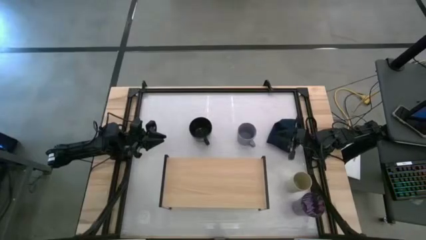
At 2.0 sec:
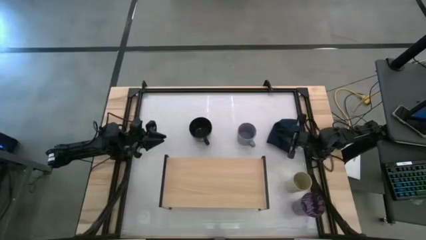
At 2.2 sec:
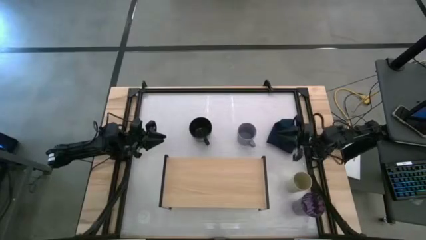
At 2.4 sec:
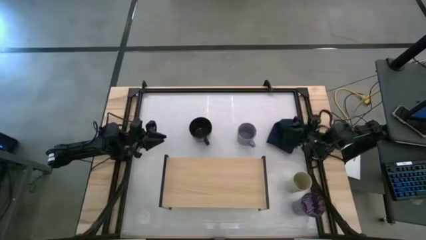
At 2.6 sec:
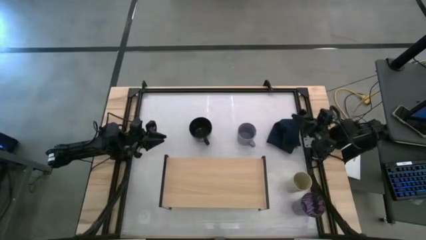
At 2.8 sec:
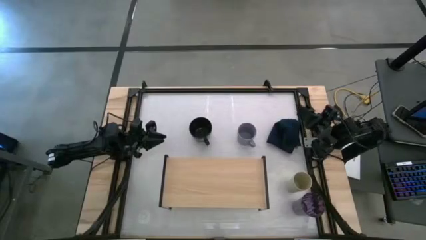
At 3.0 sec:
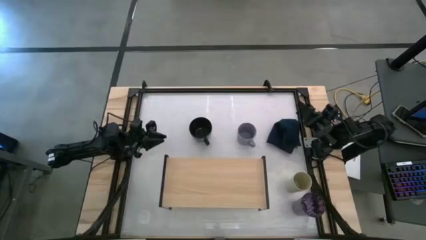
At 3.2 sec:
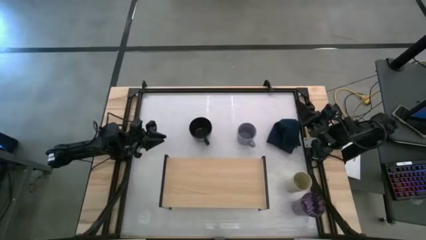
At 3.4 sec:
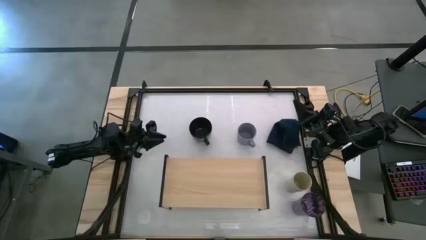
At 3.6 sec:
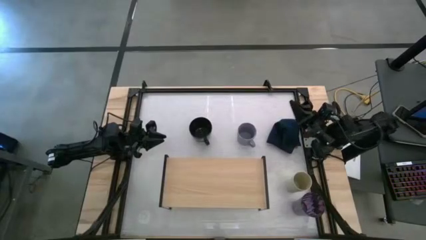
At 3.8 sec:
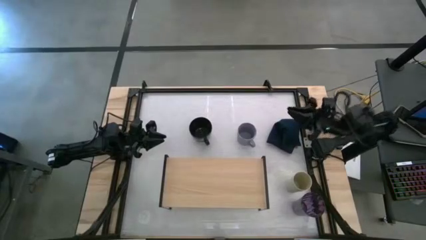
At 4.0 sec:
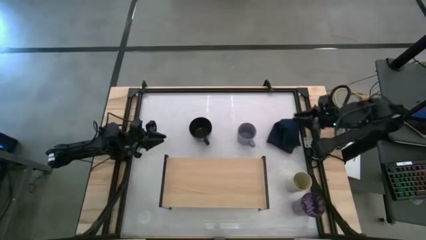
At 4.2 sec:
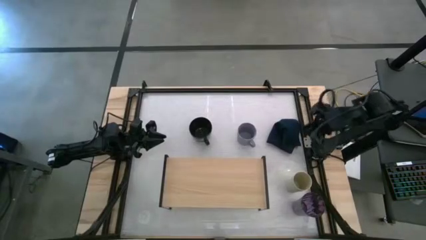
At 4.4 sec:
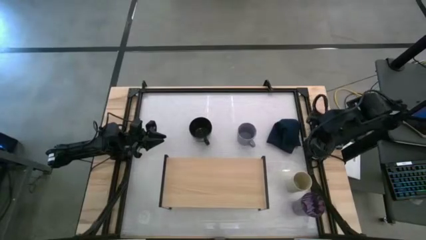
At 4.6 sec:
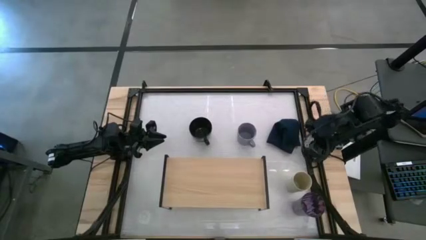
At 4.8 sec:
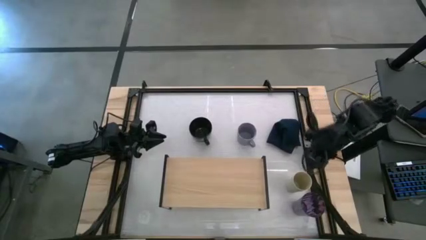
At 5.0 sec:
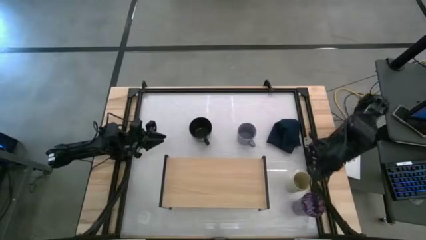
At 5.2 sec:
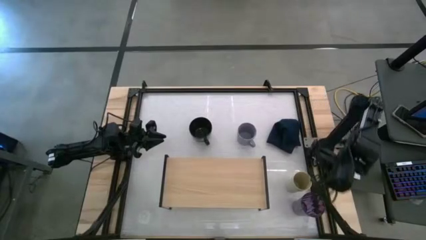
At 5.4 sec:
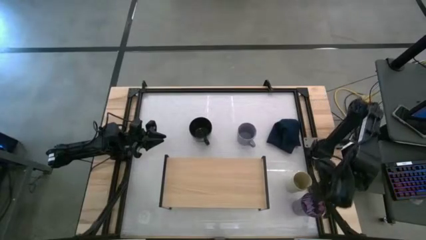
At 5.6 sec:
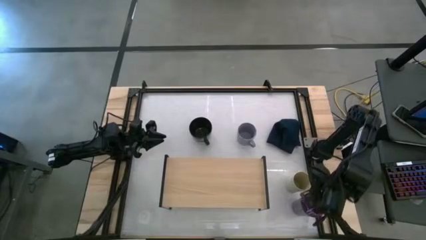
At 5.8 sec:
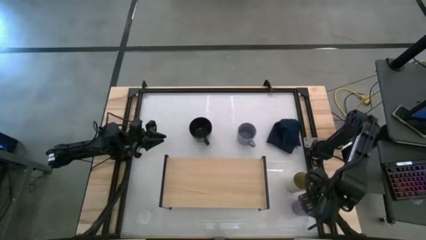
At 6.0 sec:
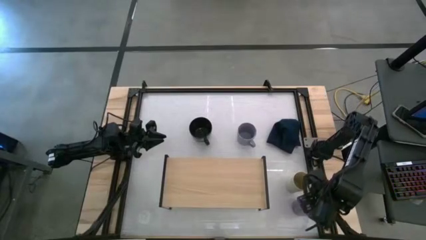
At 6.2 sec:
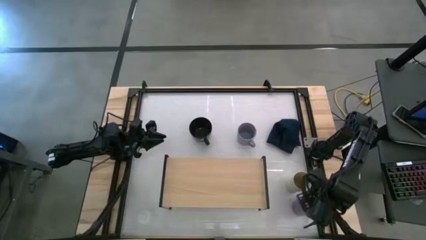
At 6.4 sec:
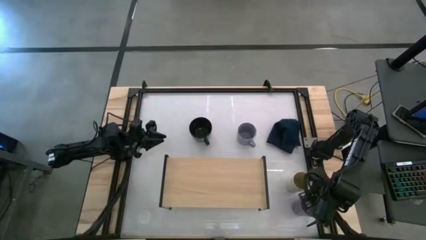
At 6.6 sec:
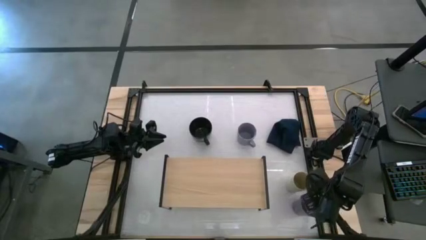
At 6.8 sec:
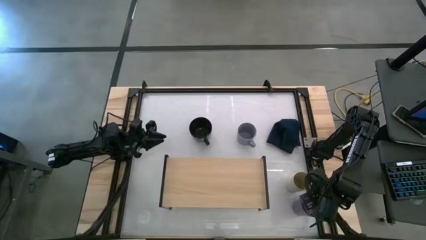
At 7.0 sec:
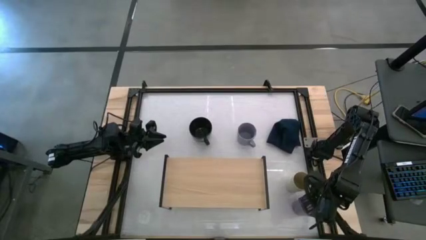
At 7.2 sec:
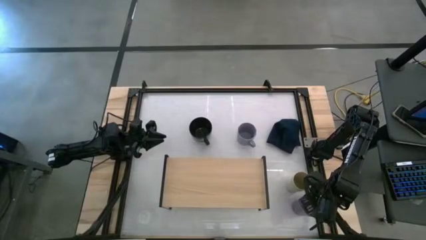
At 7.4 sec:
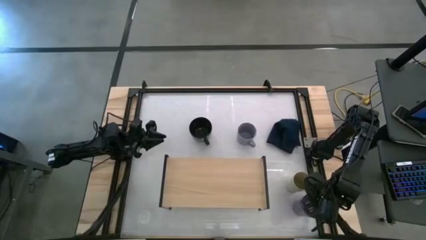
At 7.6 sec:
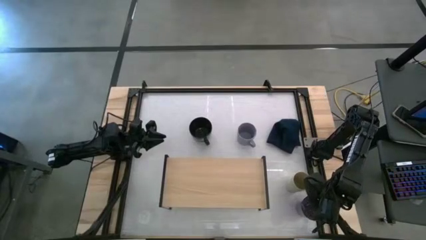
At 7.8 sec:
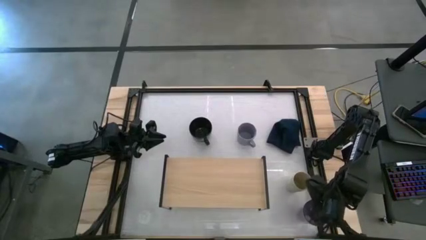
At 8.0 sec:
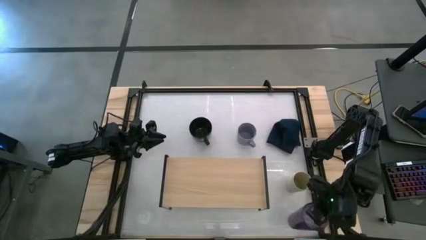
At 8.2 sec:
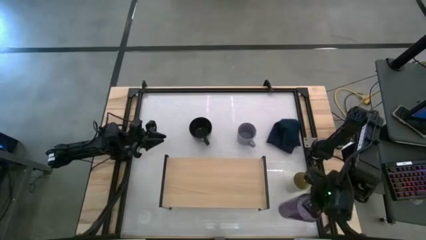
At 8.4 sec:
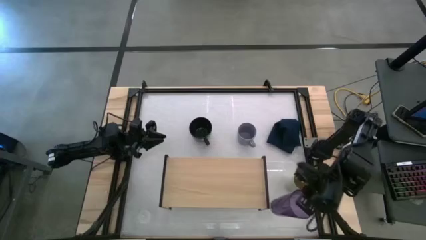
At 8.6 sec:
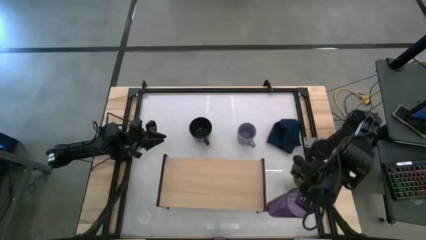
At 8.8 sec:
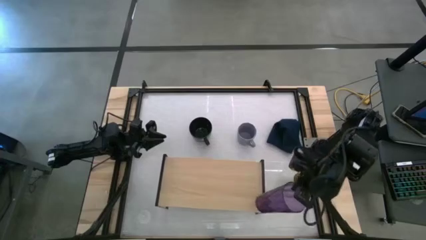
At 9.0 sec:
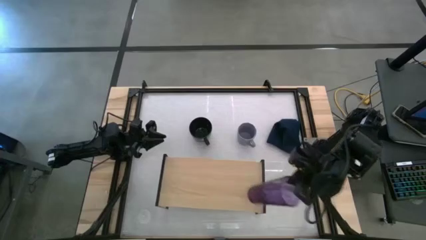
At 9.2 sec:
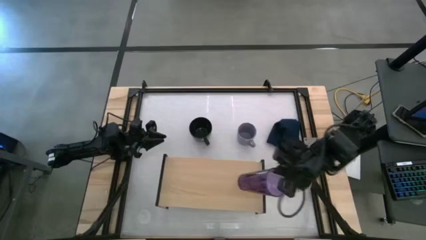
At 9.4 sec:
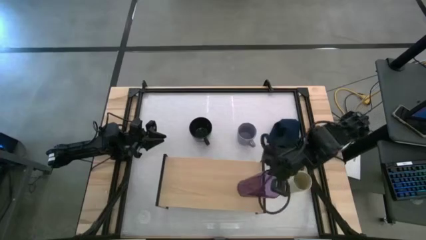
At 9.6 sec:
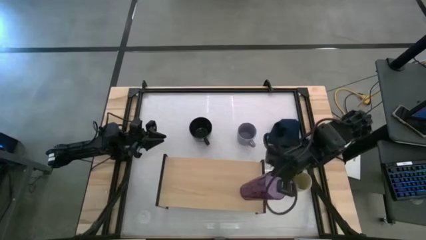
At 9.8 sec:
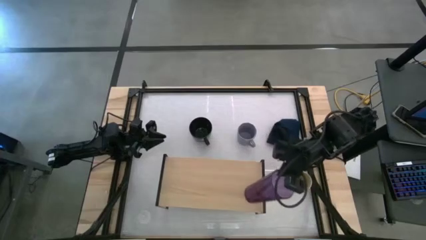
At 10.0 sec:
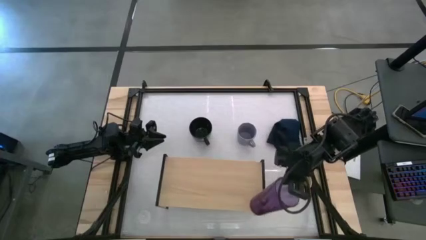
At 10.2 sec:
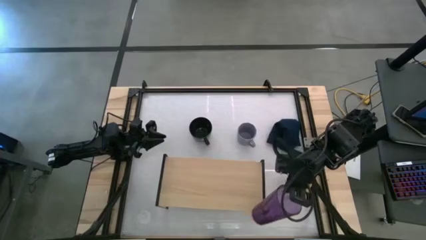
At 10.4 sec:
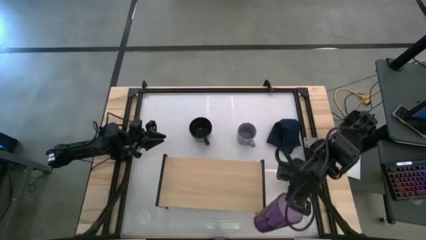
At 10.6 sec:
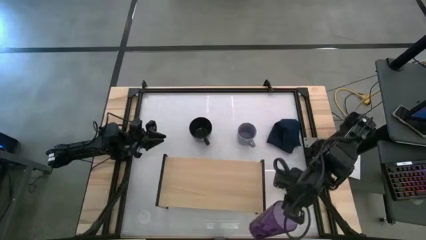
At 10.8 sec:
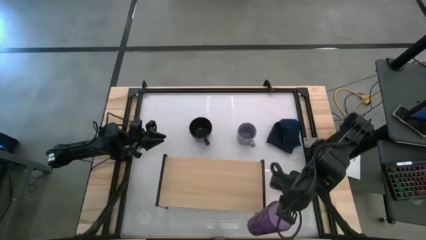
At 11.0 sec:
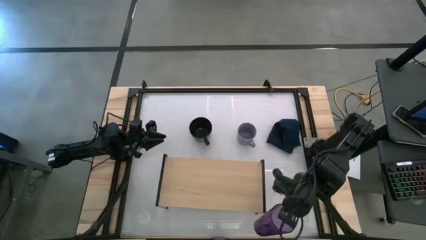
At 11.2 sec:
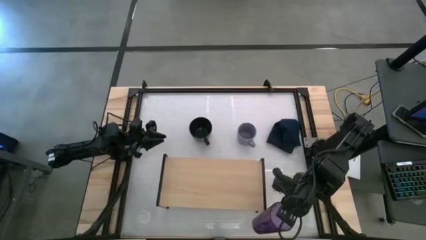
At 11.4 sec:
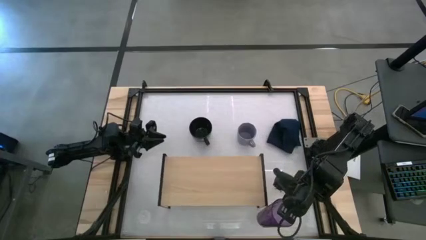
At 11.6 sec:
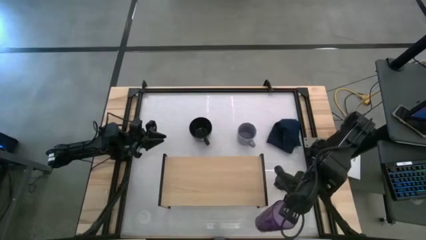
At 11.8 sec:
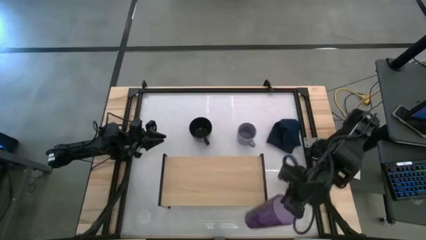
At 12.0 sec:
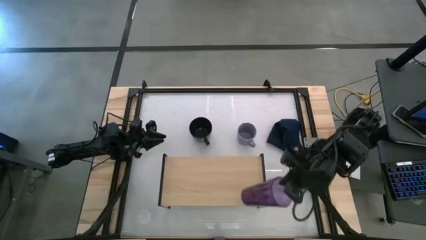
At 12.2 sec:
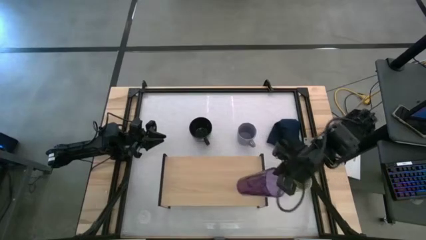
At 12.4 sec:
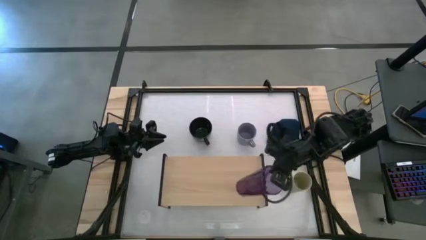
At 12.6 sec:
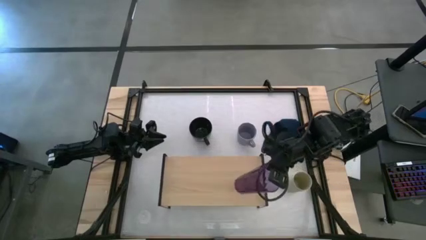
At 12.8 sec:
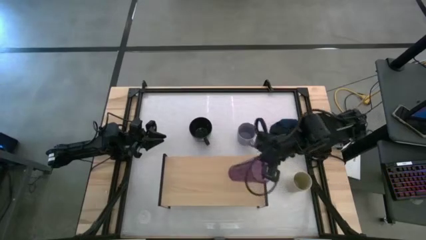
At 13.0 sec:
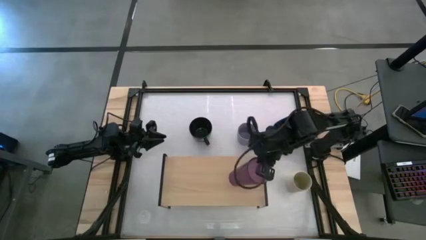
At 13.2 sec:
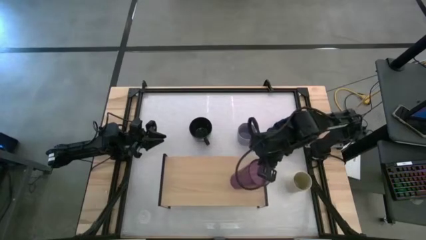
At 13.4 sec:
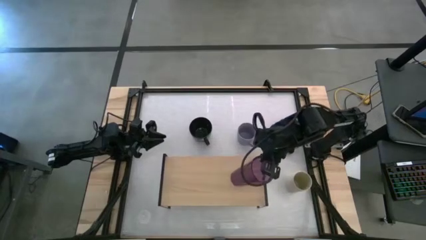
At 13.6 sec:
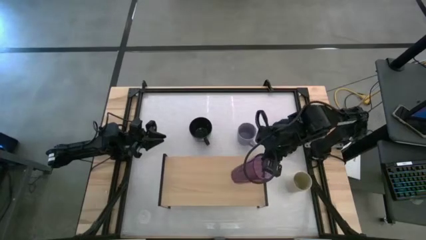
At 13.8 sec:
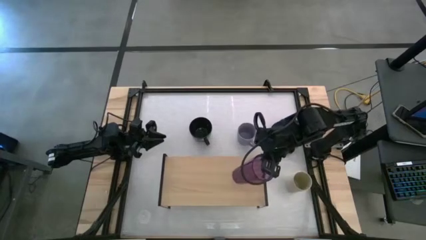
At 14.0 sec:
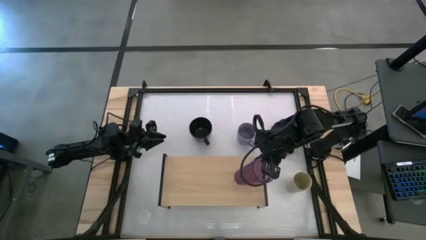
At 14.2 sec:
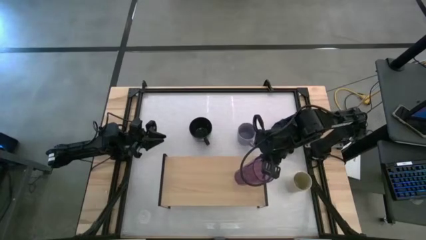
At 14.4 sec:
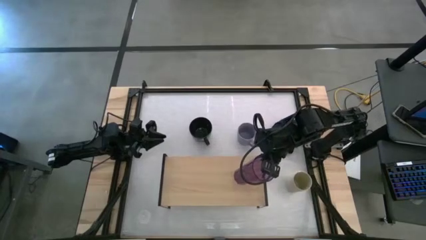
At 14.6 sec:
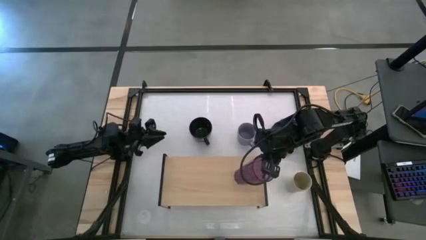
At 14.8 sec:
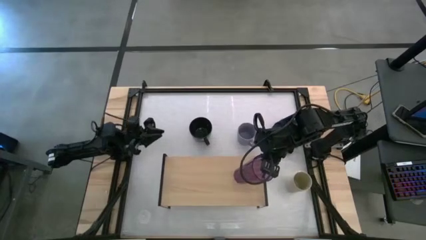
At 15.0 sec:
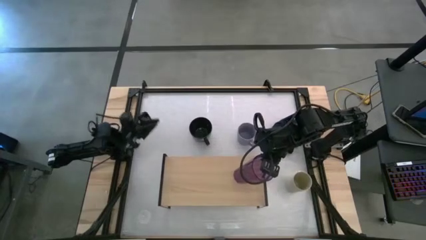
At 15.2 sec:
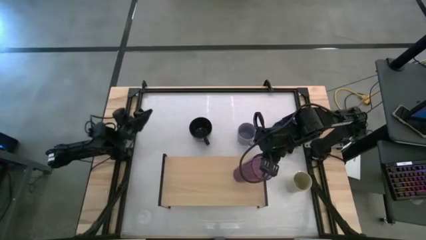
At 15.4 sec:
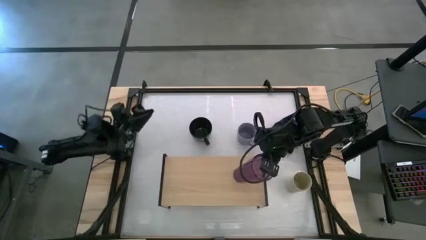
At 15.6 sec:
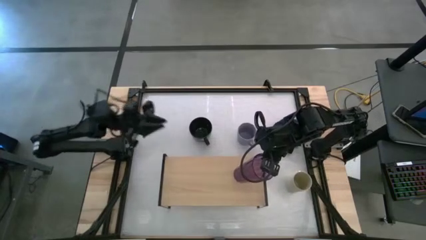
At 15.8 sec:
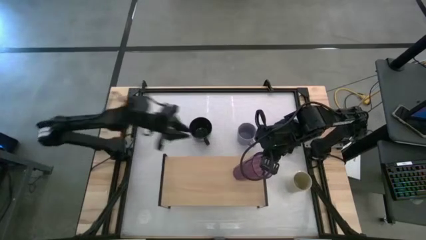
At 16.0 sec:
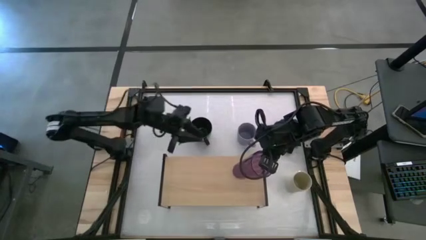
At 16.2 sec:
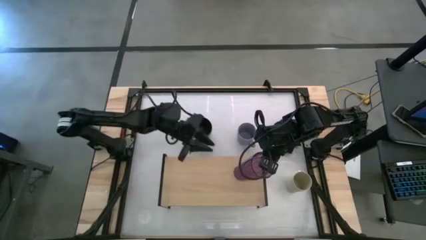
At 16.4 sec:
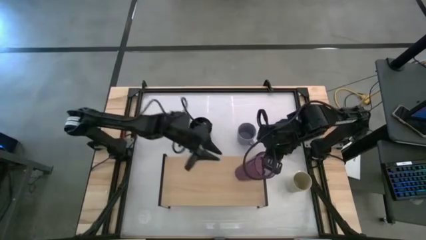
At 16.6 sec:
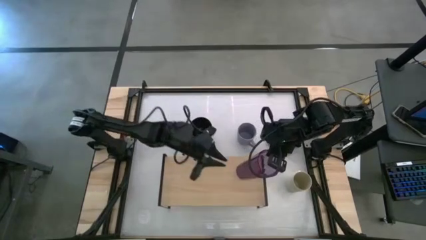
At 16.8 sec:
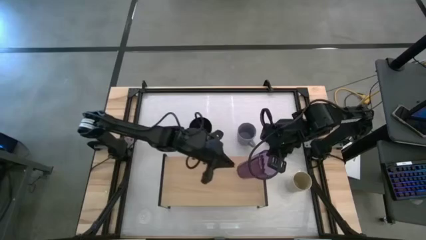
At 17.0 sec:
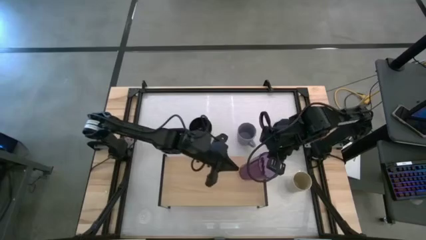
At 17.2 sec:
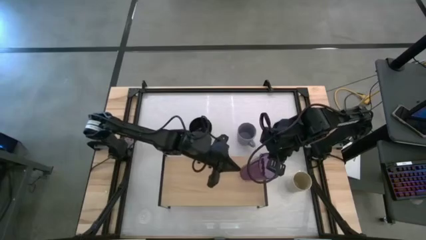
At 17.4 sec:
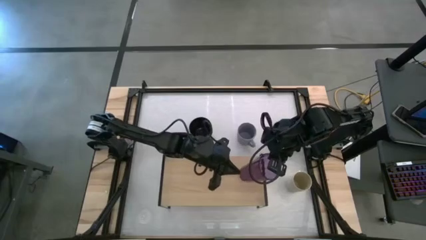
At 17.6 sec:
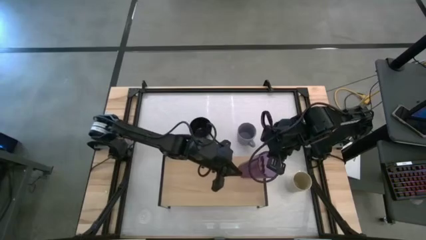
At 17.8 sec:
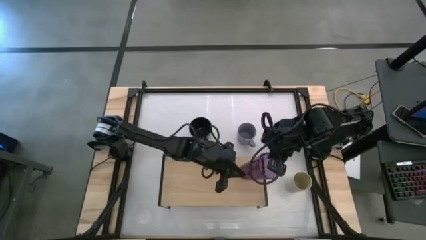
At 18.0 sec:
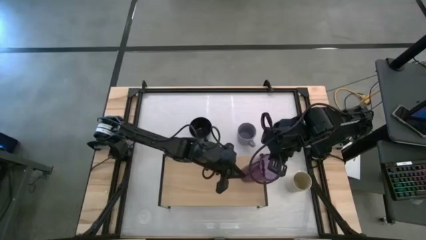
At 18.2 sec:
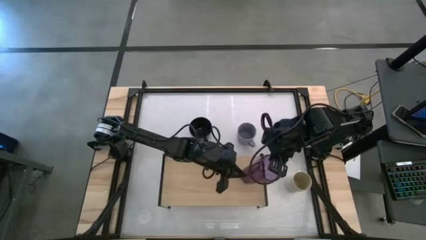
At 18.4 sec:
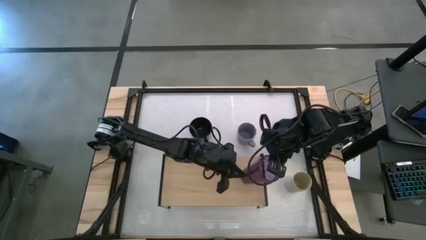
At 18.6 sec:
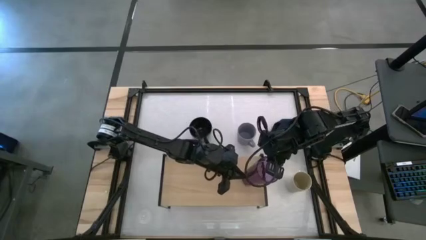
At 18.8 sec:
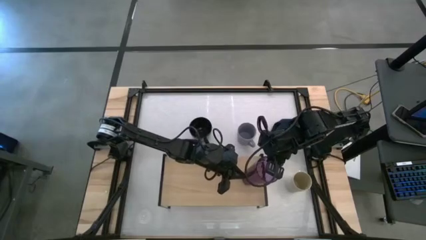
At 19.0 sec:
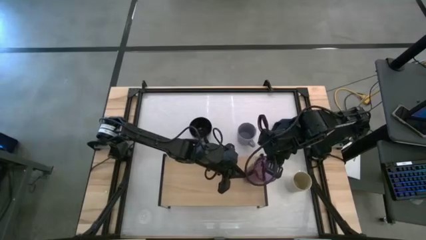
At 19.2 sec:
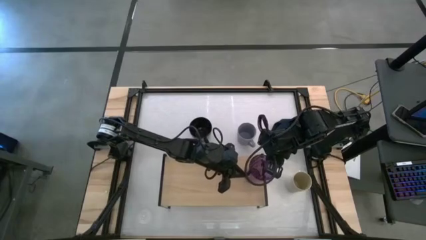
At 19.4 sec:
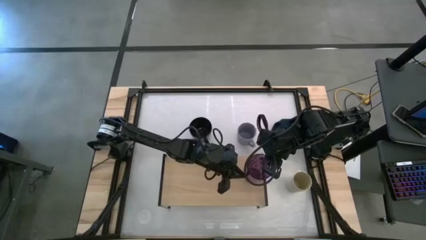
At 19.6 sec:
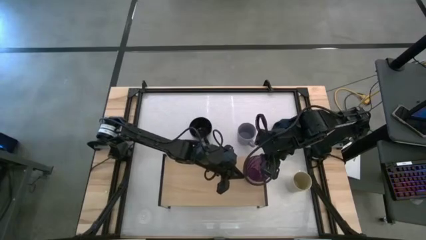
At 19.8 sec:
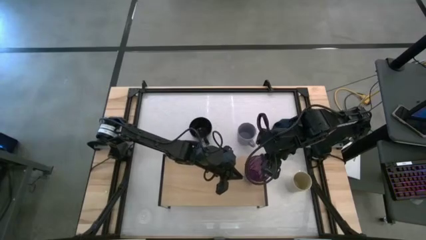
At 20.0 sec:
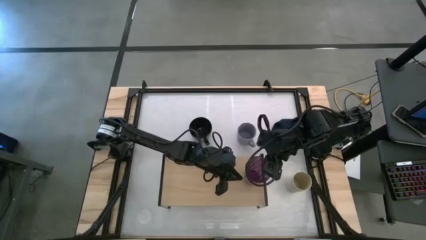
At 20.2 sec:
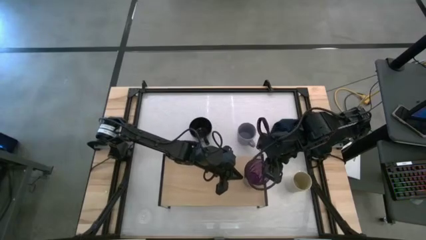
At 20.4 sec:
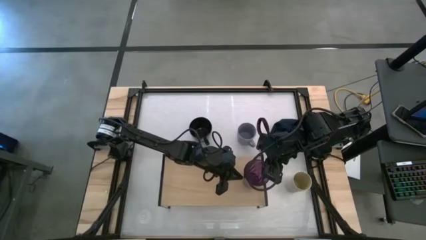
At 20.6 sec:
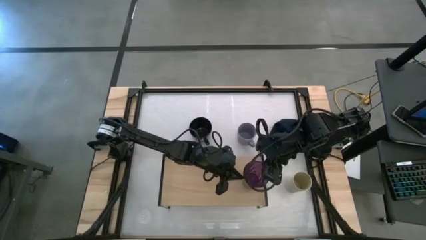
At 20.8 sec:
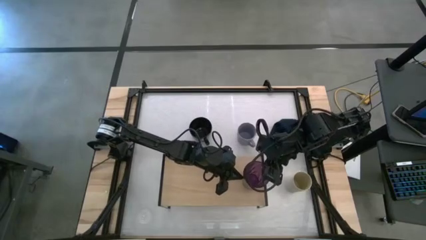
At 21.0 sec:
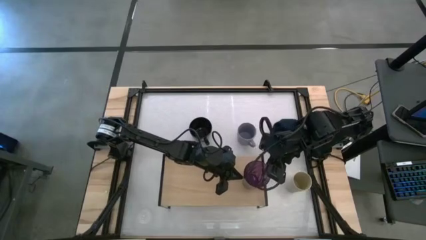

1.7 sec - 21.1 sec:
Task: Stack small to large cups/mugs on shelf
Put the purple cup on the shelf
